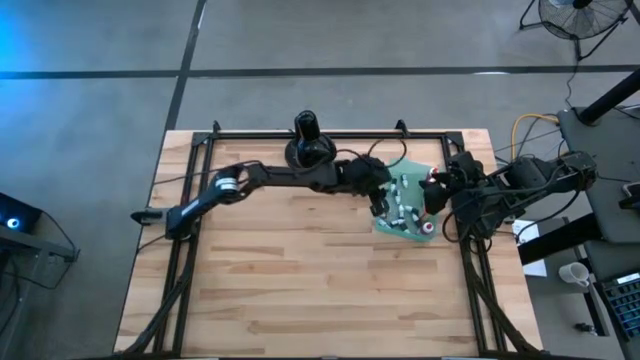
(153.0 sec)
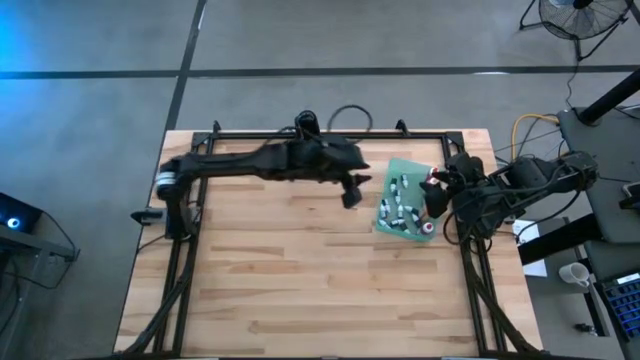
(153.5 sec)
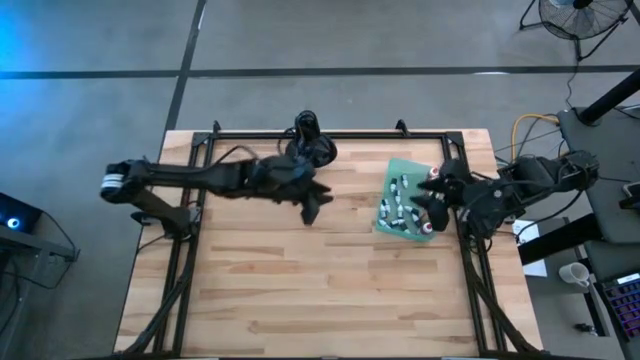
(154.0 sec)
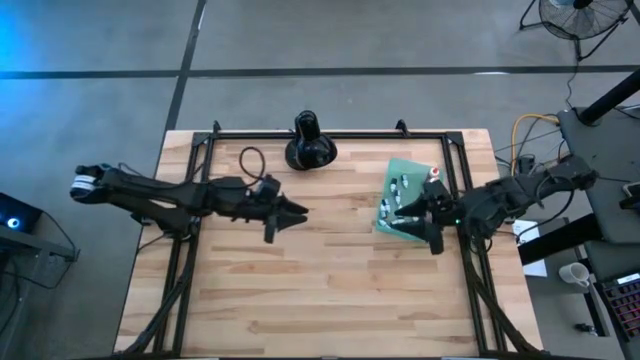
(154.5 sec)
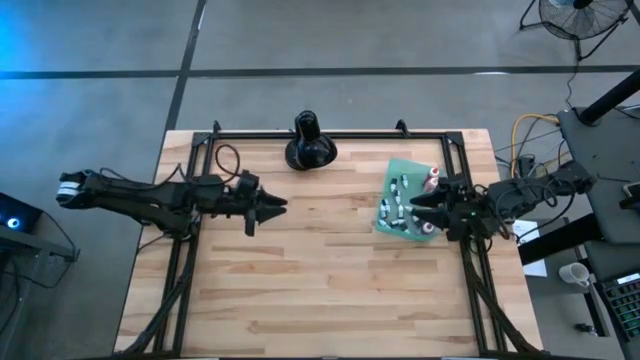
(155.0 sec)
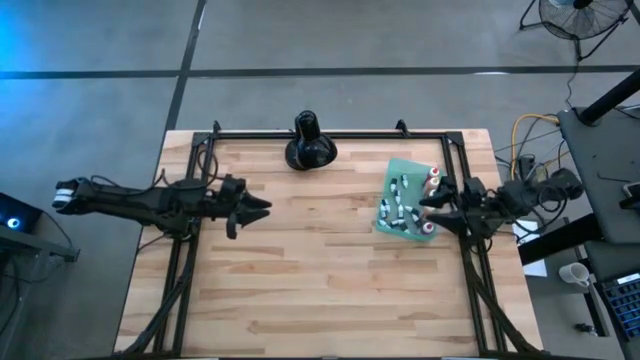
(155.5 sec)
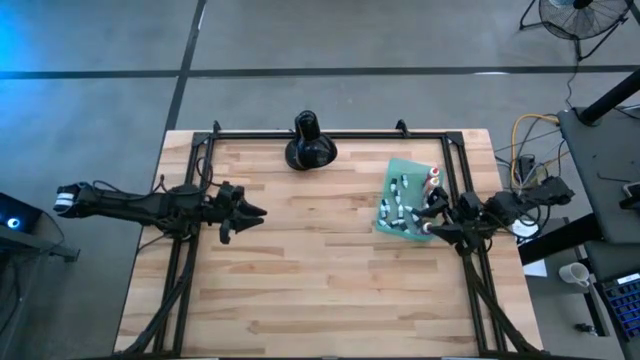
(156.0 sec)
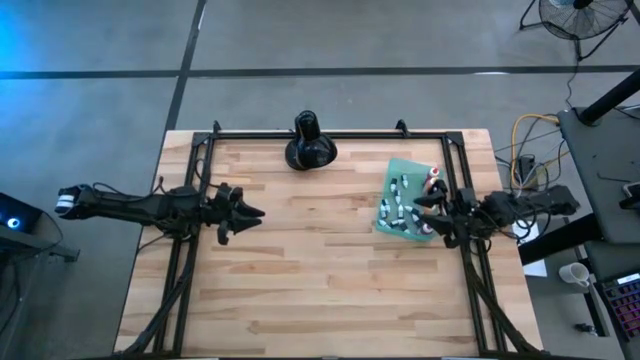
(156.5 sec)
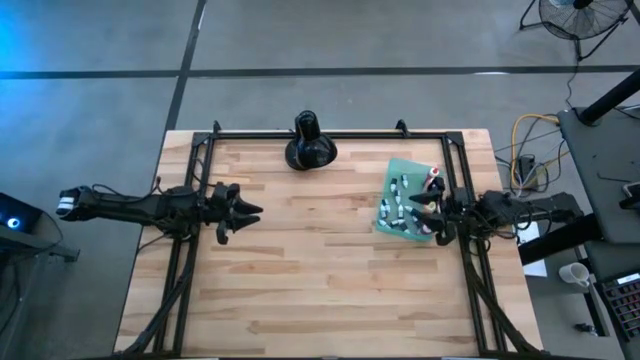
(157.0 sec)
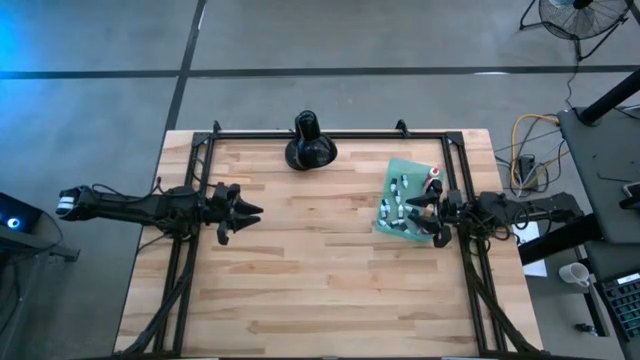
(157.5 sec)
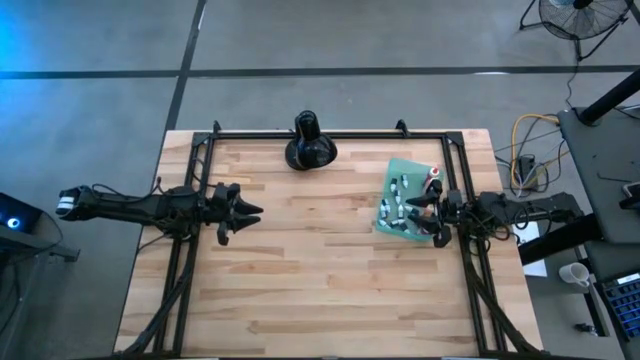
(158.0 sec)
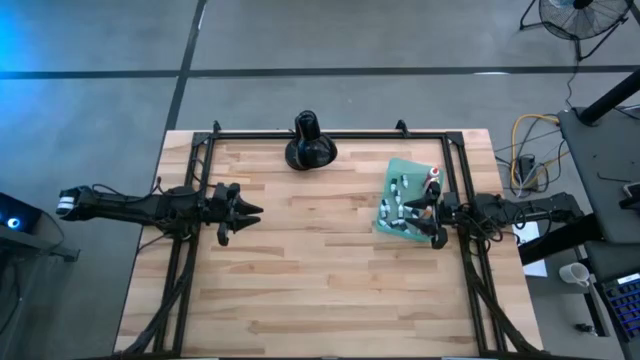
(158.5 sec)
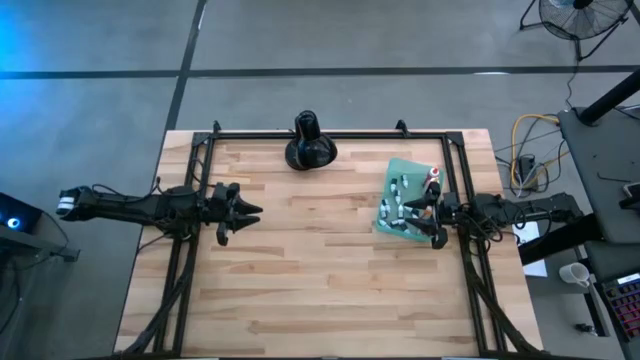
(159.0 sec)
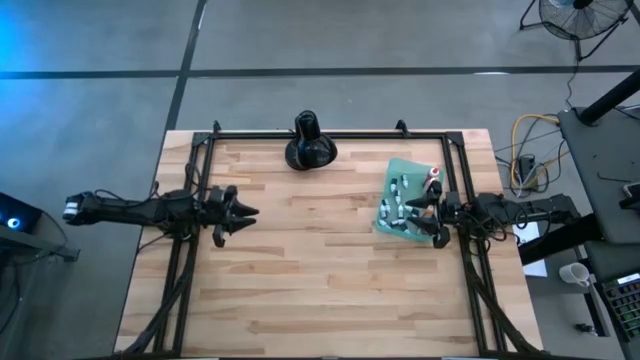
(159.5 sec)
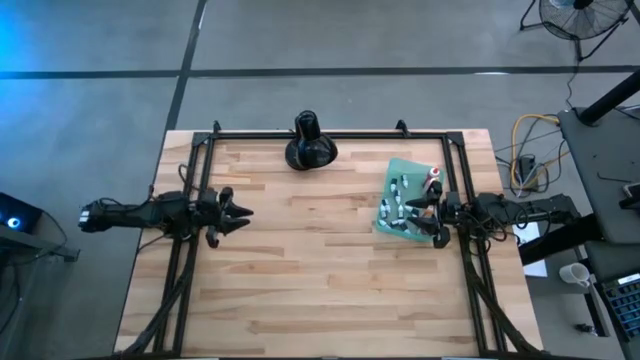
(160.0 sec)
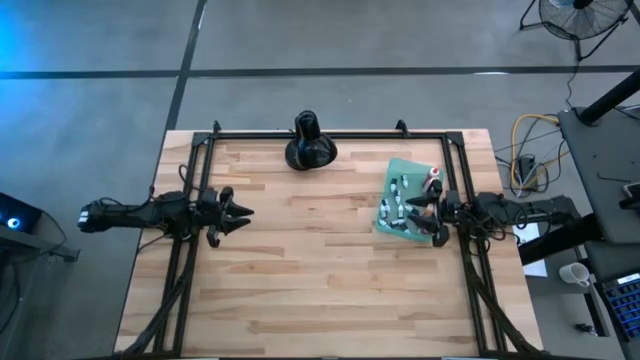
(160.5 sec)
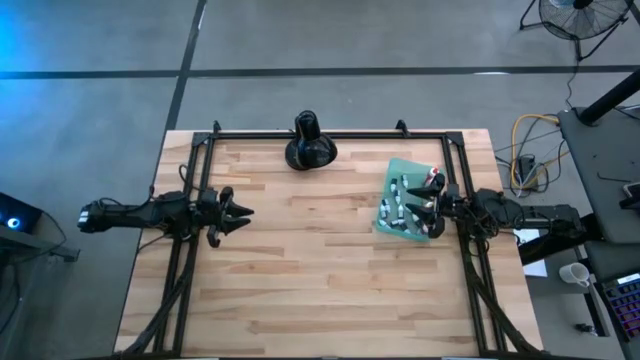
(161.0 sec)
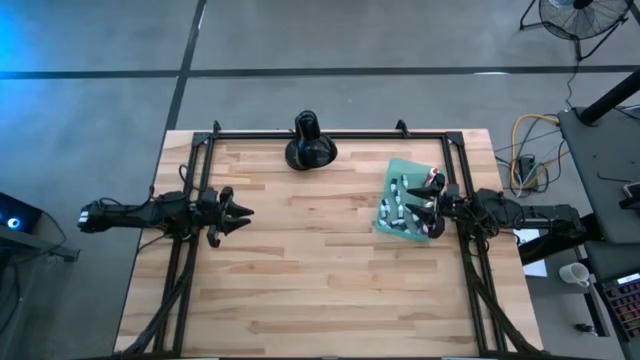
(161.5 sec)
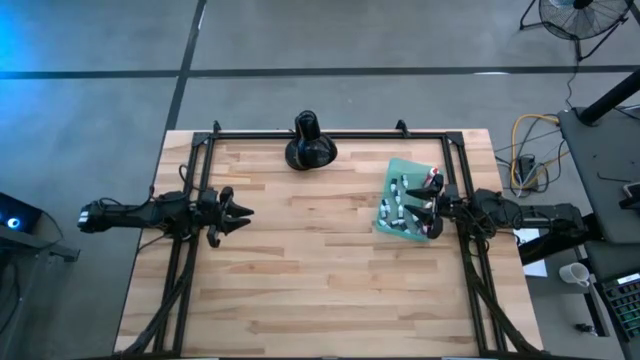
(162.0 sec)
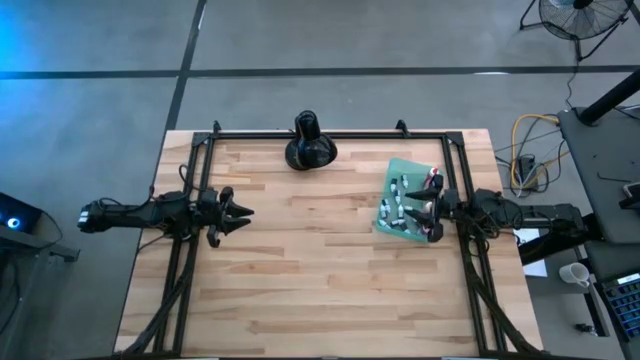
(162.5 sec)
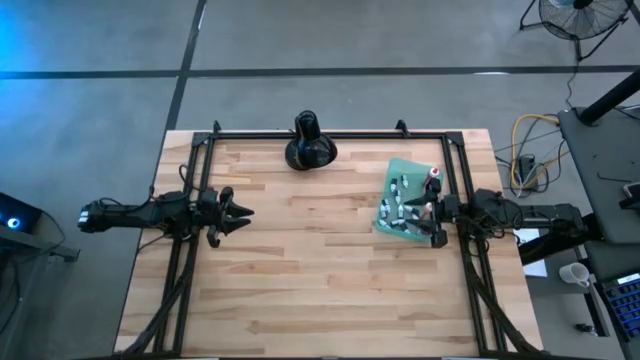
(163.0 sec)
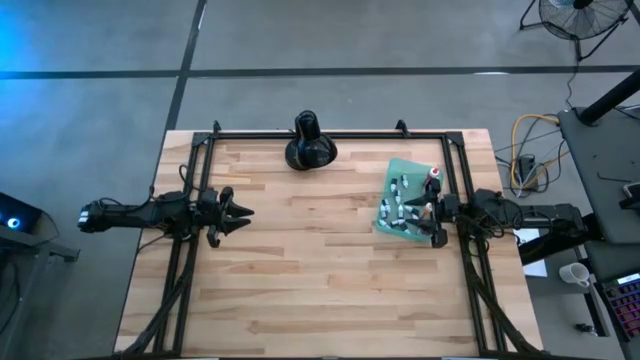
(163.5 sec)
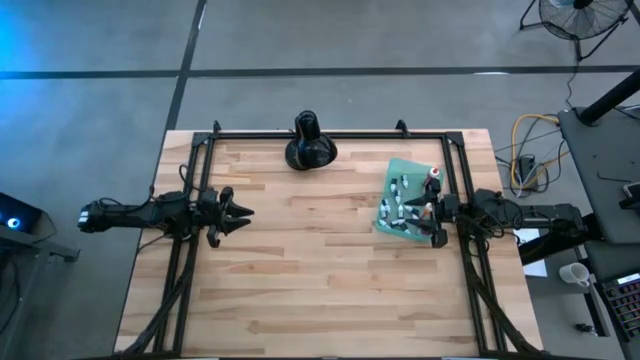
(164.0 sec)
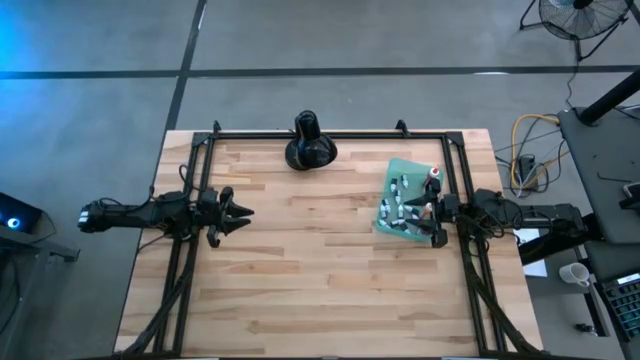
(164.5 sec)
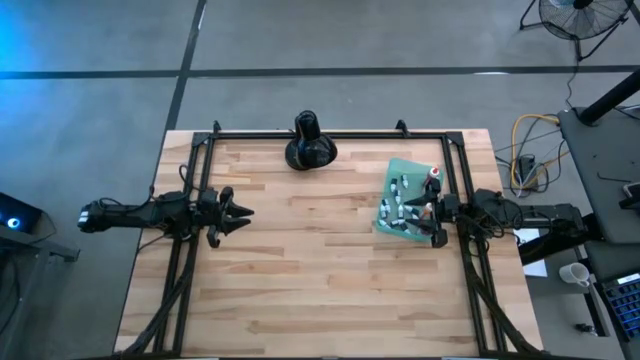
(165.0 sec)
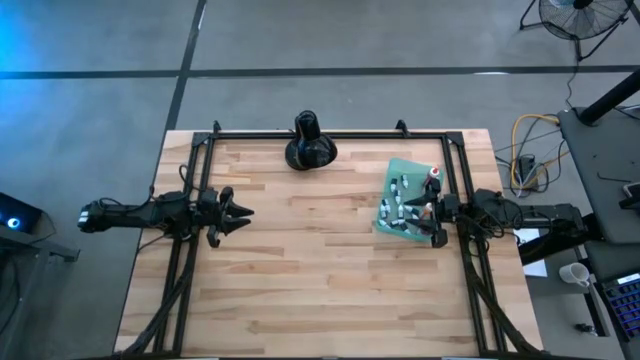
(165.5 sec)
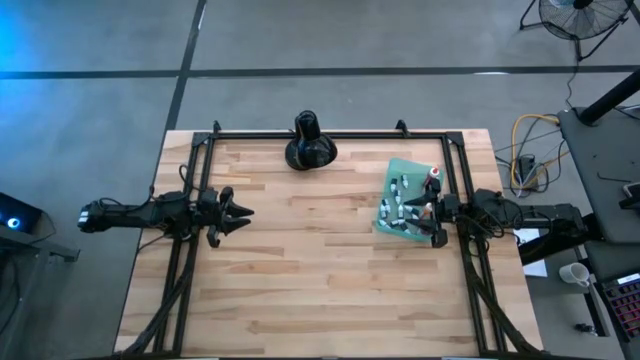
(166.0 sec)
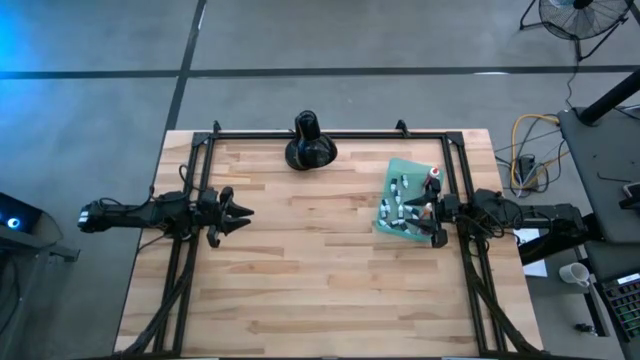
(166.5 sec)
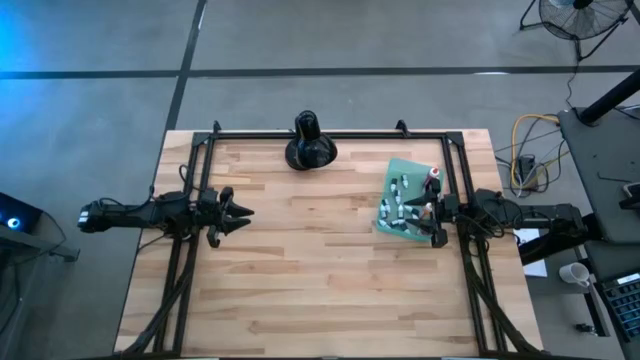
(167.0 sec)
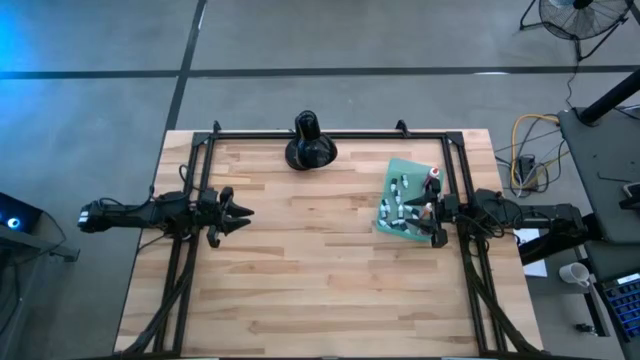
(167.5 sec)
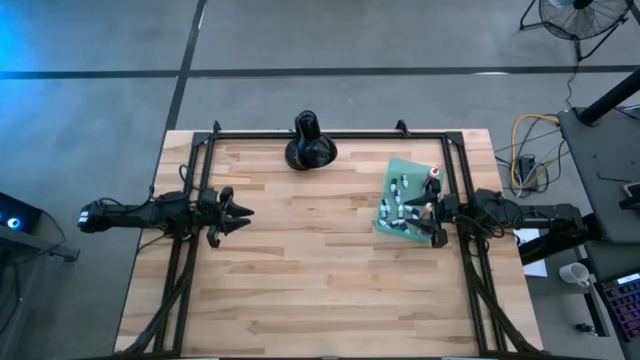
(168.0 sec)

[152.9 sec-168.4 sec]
Task: Pick & Place food coloring
Return to Home Position

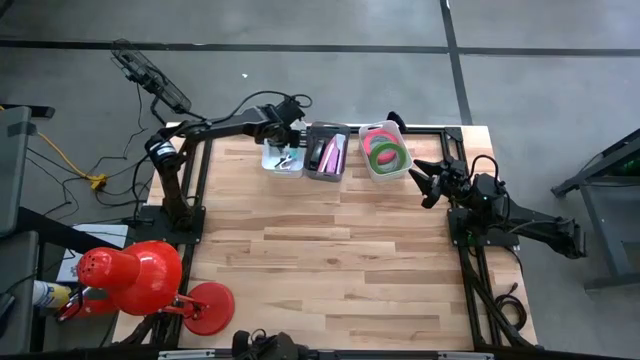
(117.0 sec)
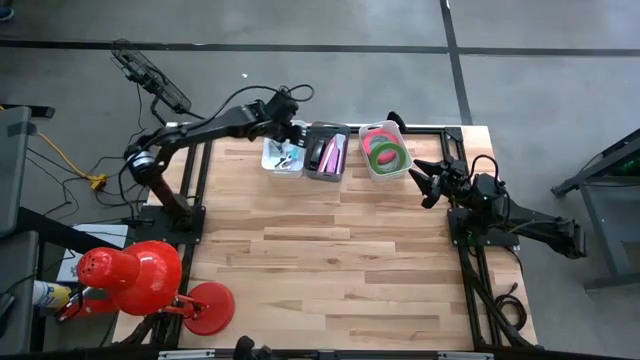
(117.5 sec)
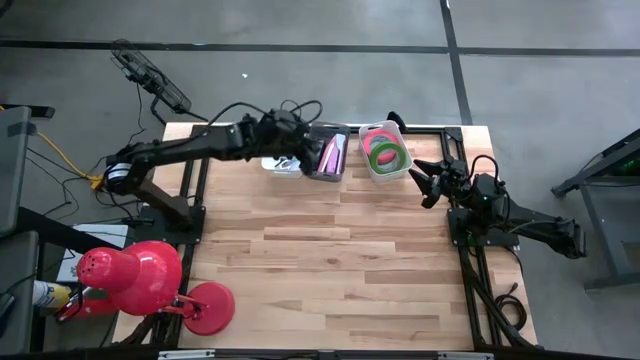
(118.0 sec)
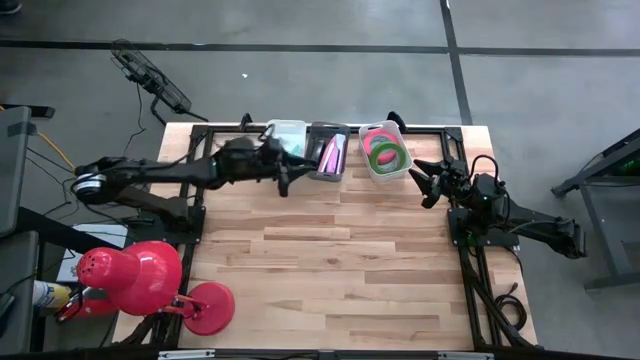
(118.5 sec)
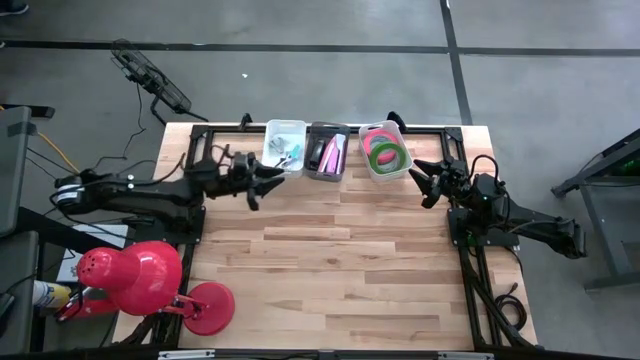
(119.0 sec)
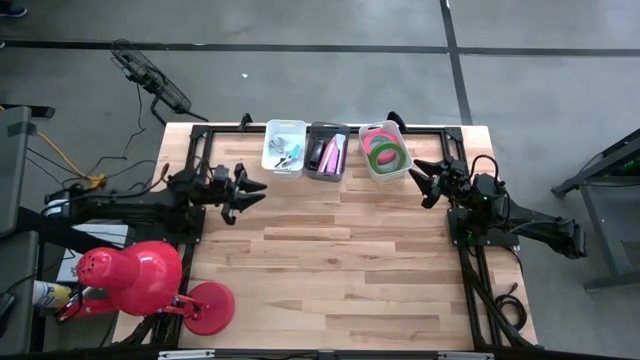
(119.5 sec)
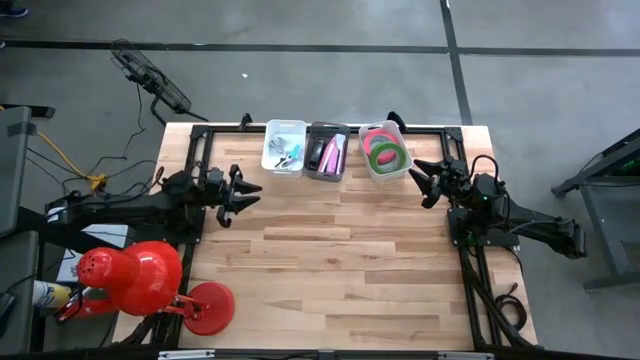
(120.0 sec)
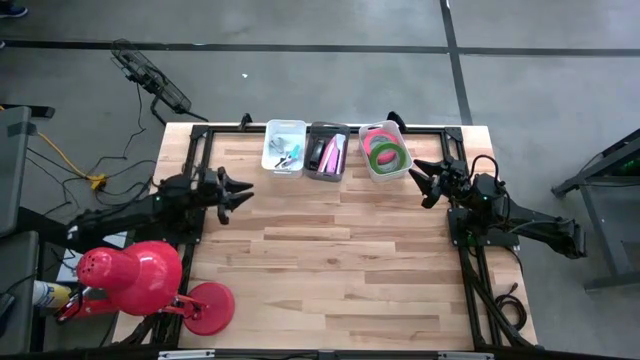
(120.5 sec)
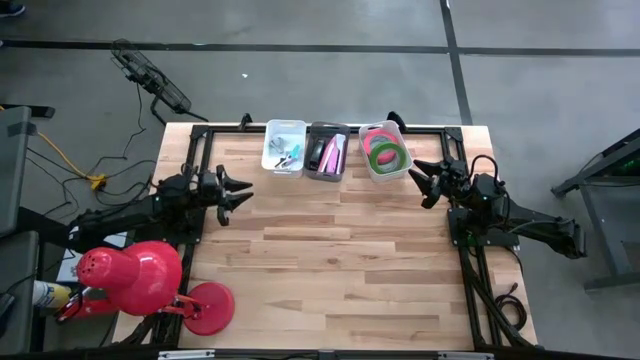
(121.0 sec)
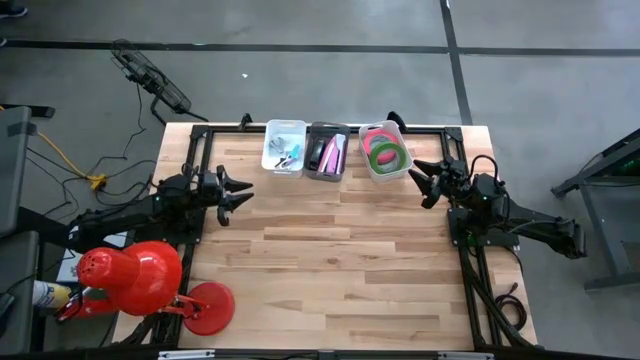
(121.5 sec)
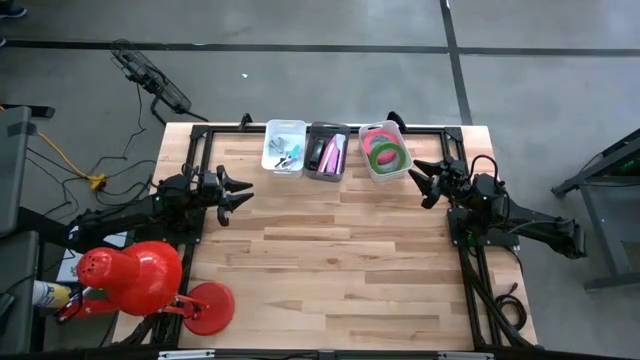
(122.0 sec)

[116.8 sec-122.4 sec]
Task: Pick and place Stapler, Stapler remover, tape
Return to Home Position

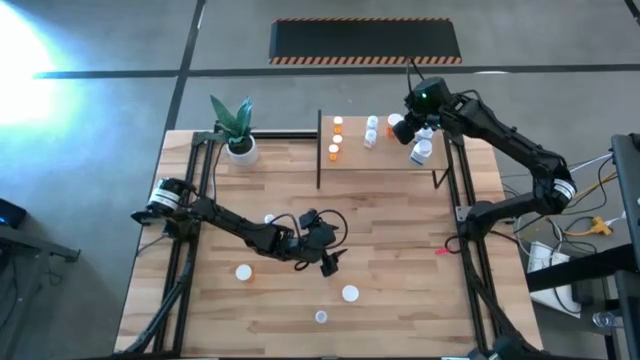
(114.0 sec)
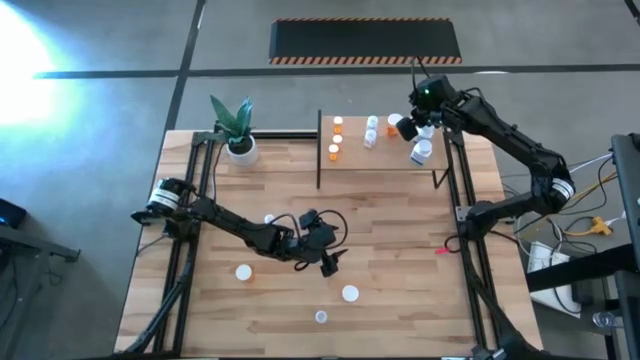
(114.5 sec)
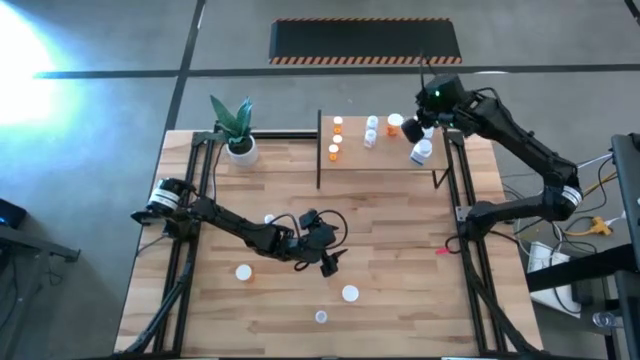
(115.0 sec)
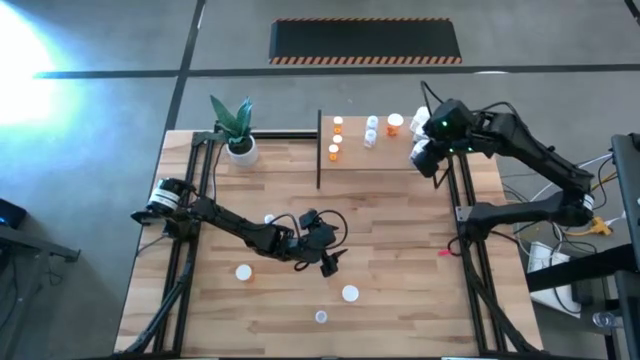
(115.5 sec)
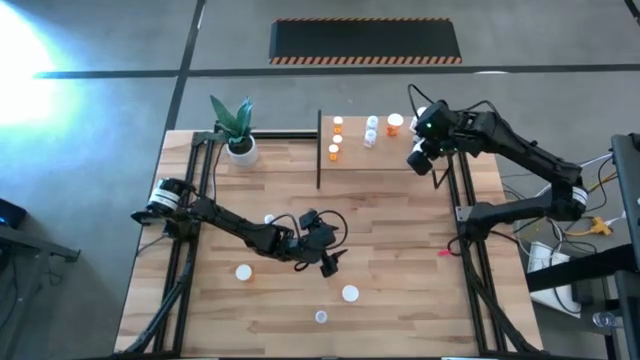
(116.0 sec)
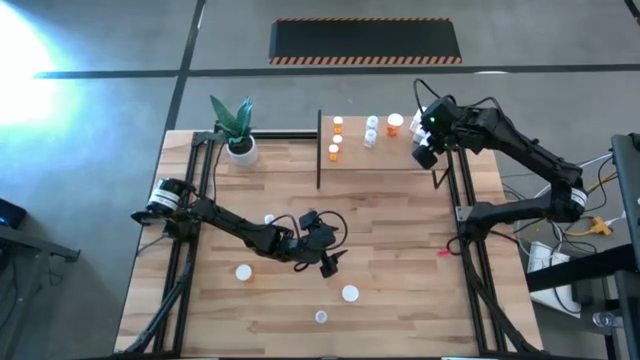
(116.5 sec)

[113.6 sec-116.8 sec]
Task: Pick and place medicine bottles onto shelf by color
Adjust the white pill bottles on the shelf
